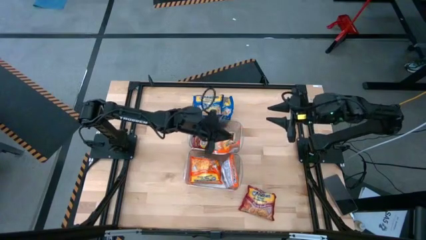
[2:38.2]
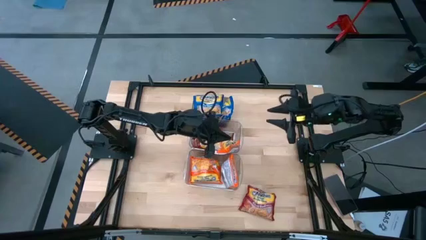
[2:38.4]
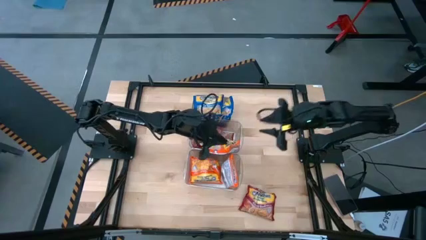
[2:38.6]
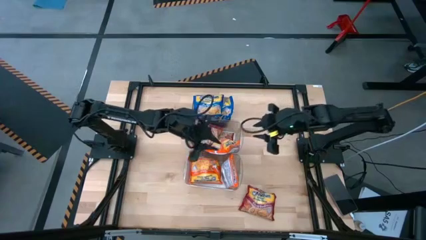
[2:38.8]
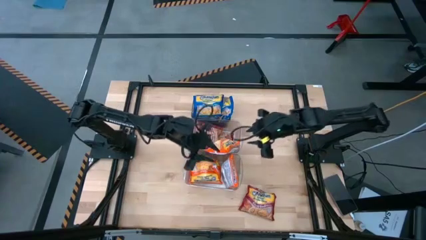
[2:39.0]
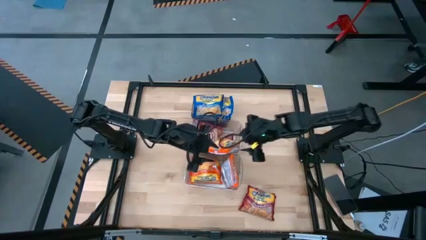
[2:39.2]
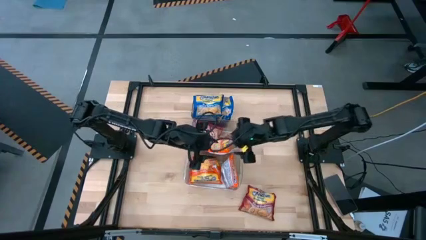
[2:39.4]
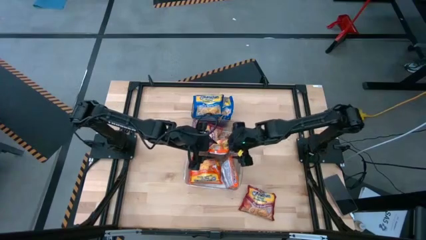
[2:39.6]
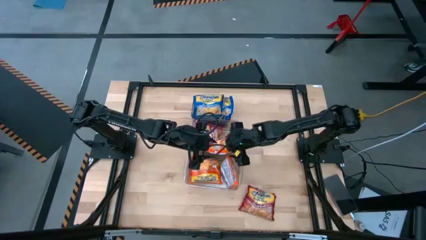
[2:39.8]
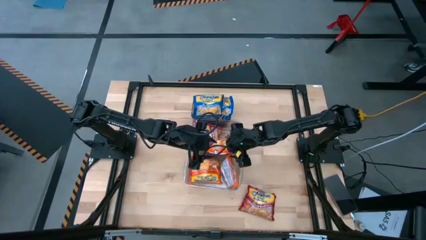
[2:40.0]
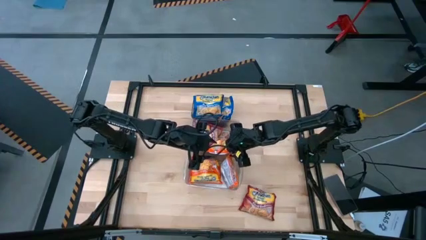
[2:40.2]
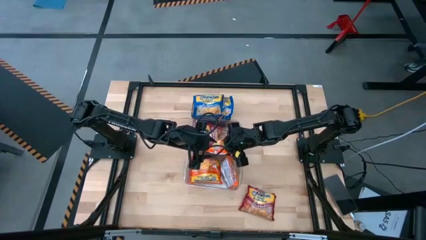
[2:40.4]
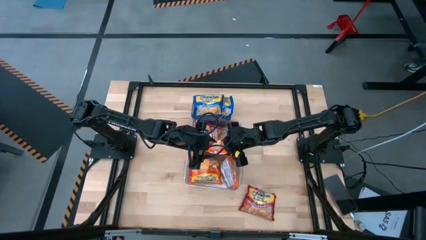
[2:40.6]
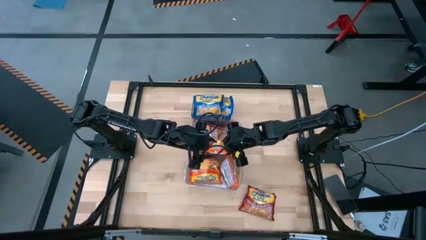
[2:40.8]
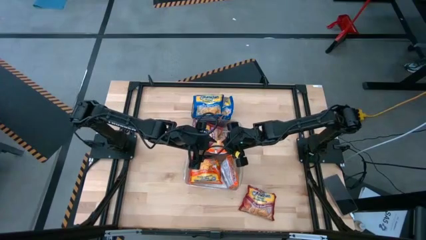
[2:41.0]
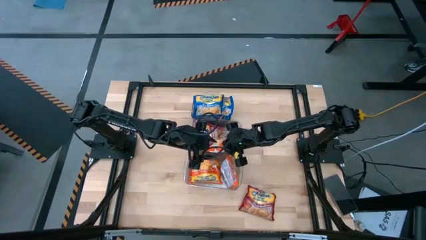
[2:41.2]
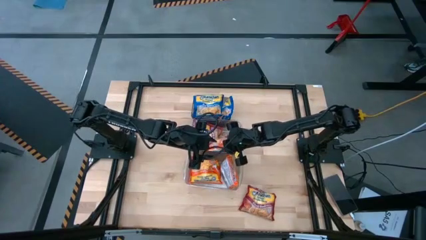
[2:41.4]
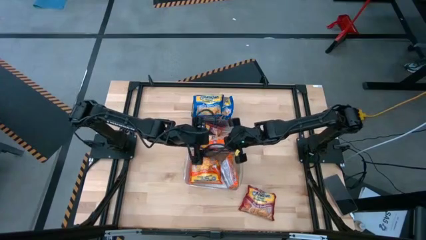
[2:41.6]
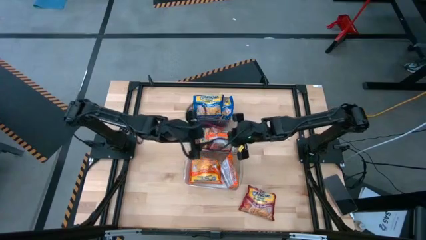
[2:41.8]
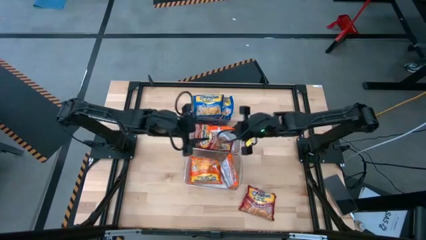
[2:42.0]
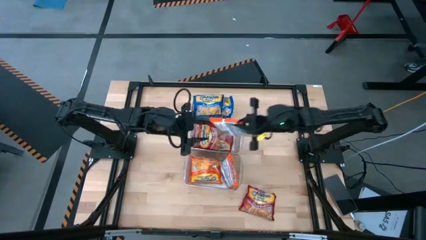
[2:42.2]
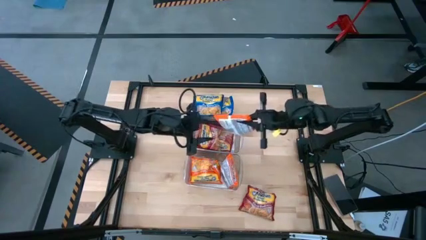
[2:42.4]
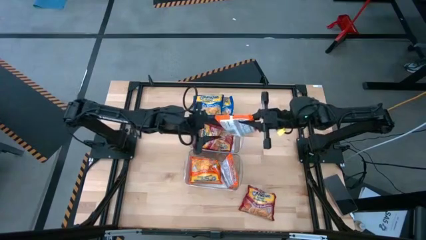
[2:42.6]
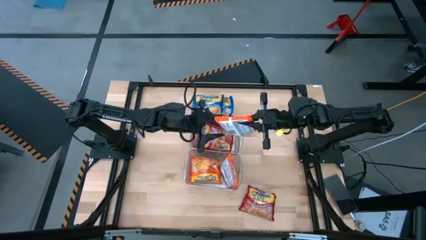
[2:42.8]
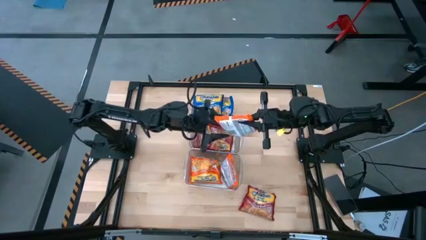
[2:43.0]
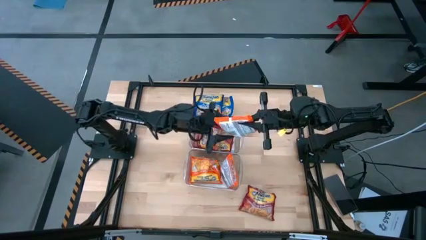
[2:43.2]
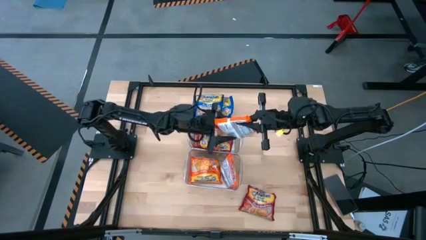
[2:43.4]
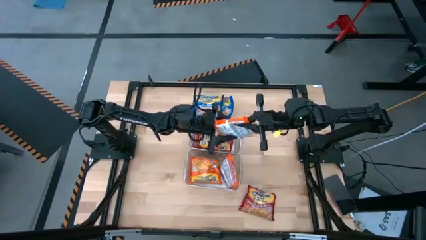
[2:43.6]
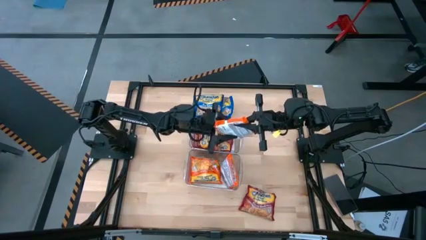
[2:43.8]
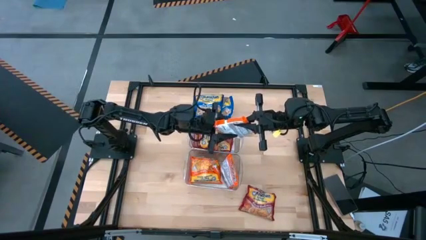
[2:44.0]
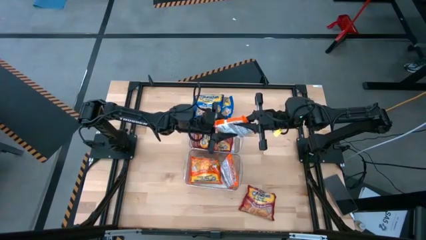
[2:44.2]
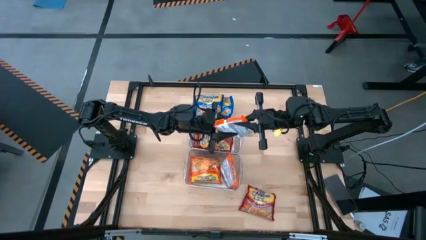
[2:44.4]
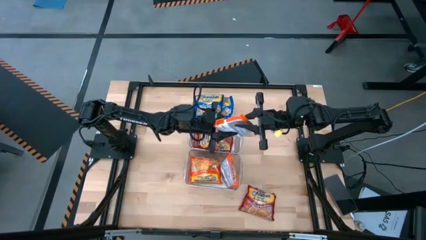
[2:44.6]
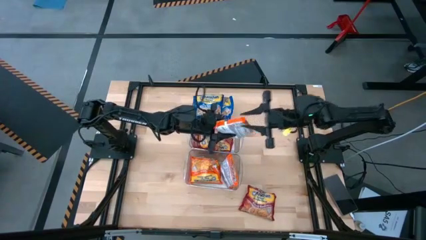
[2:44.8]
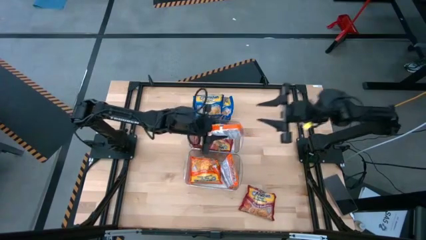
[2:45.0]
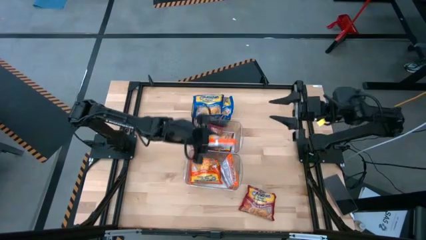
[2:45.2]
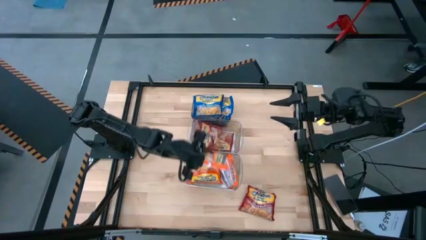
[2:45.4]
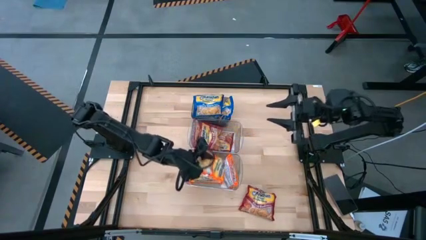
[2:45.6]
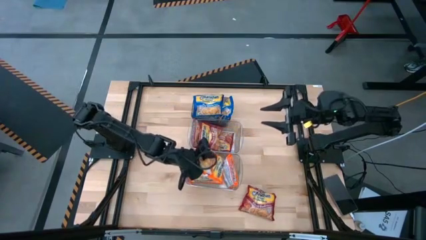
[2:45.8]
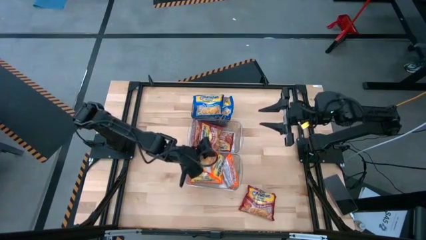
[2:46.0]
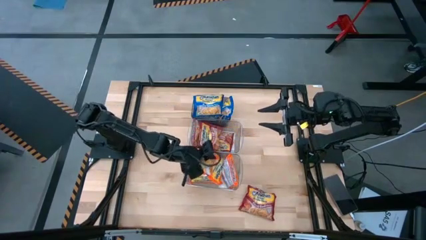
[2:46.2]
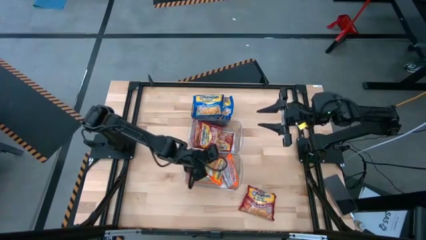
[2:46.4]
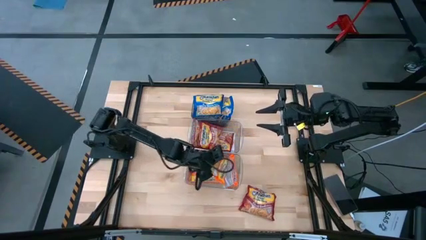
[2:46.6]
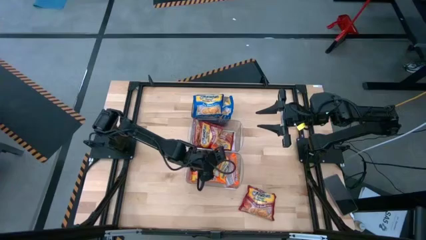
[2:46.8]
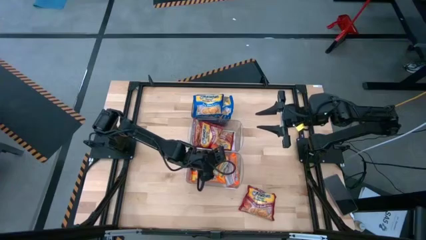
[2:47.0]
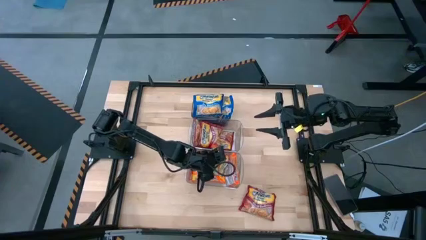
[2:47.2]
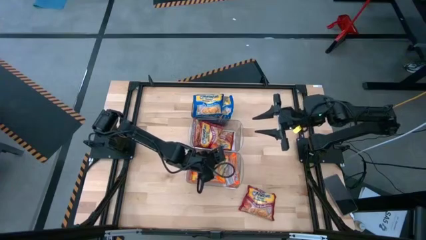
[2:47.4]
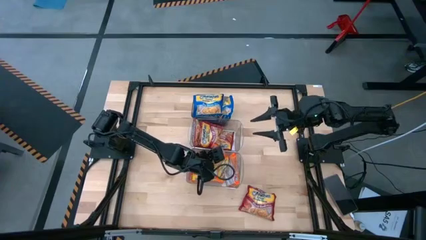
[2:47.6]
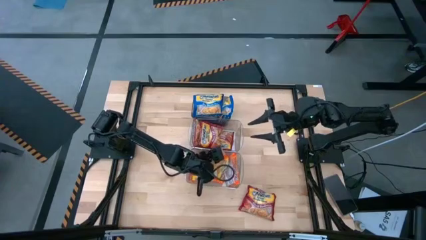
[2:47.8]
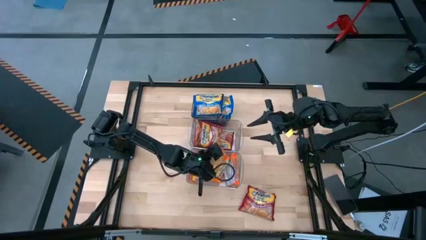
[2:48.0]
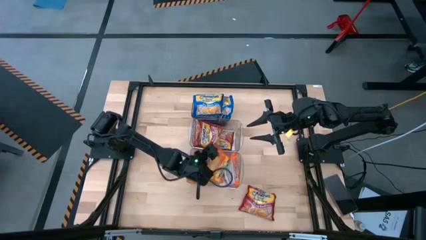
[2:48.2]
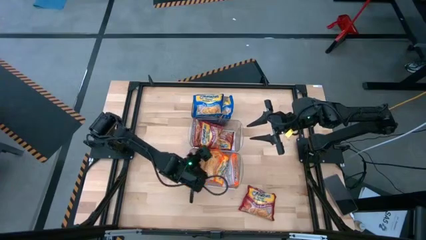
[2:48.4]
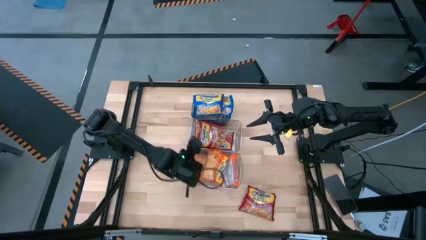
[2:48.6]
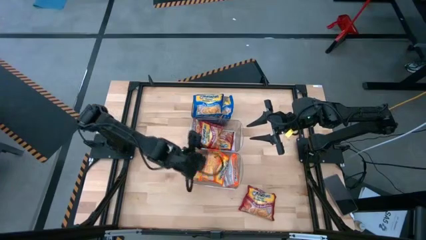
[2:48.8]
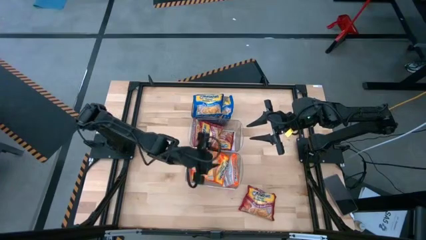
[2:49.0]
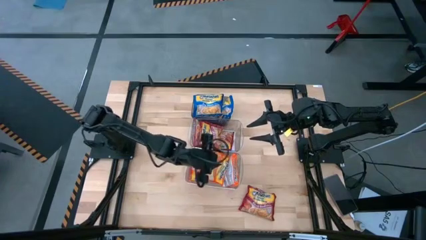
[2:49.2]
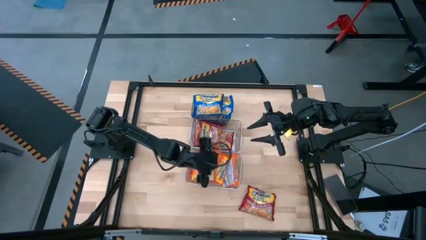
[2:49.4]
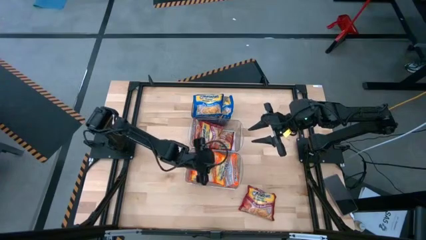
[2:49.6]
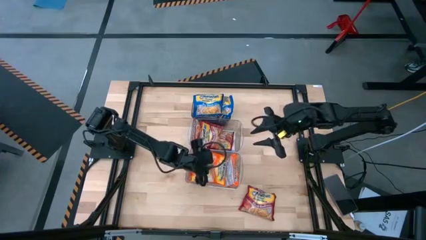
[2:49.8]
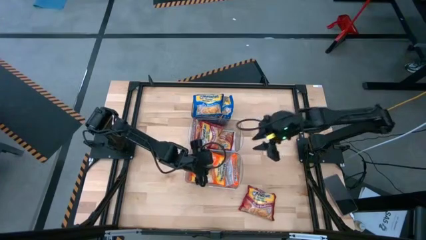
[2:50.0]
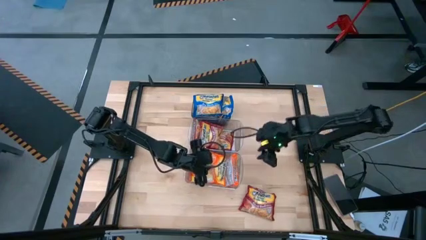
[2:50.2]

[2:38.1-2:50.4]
Task: Sort Maruchan noodles
Put the orange noodle pack into the bottom transparent bin

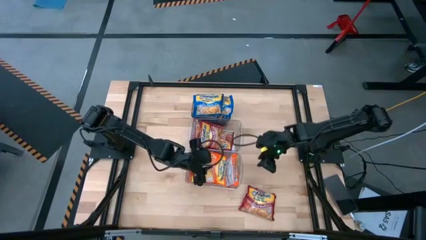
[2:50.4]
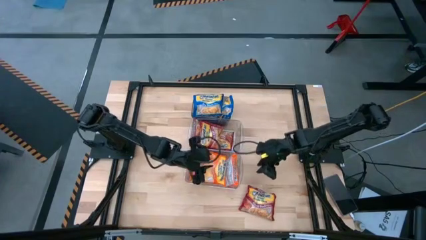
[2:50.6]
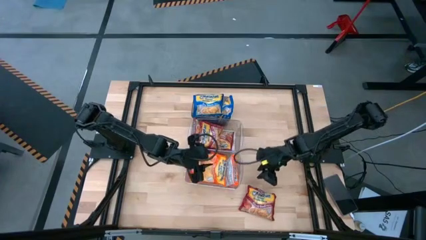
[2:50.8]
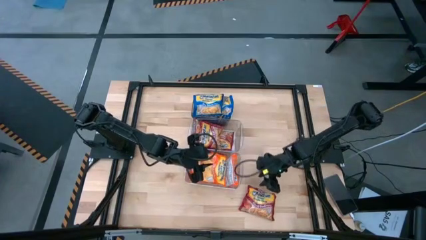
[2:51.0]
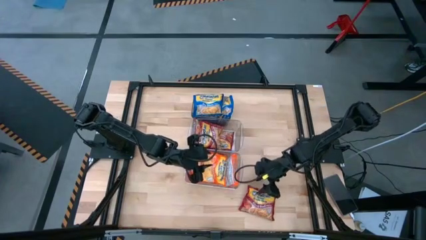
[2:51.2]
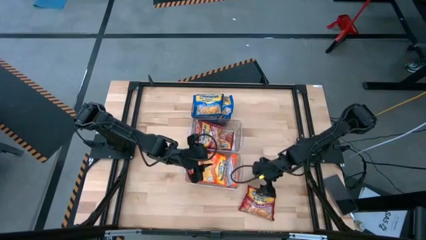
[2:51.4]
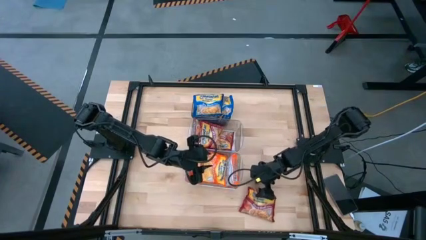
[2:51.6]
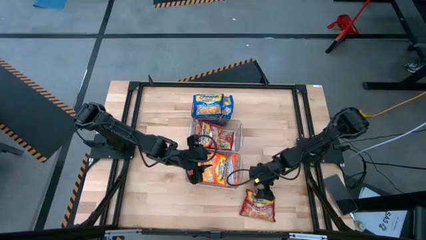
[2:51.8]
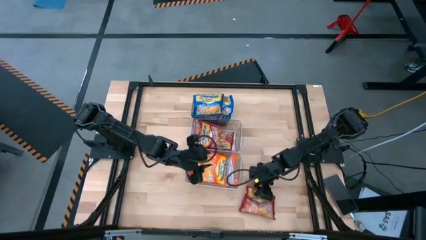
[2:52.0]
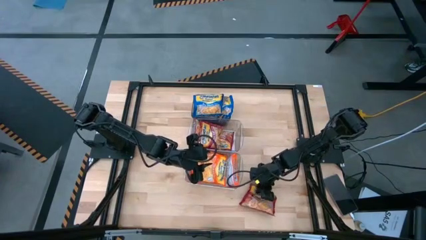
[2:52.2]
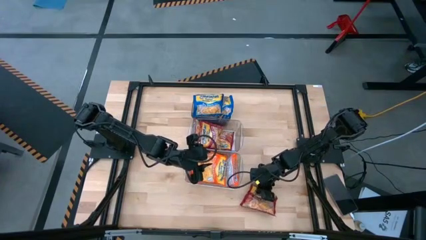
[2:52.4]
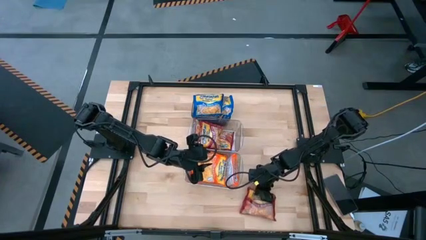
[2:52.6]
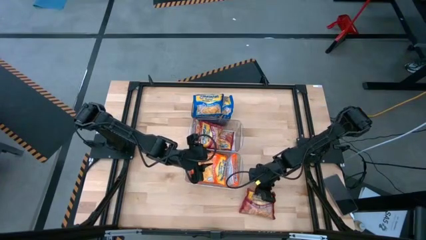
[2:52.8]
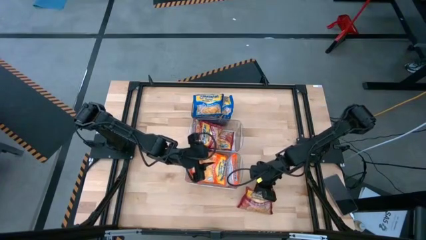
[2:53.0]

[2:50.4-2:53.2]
Put the red noodle pack into the top transparent bin
